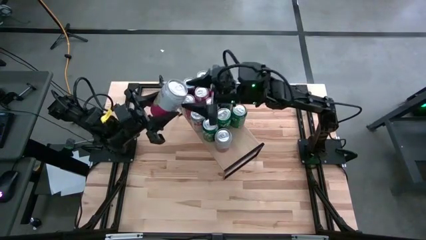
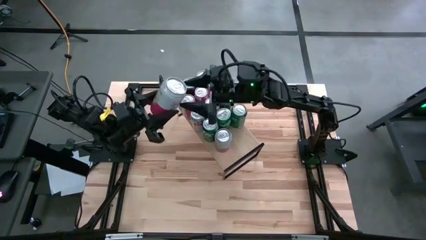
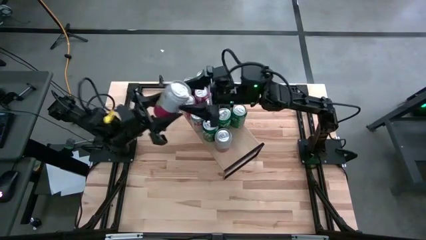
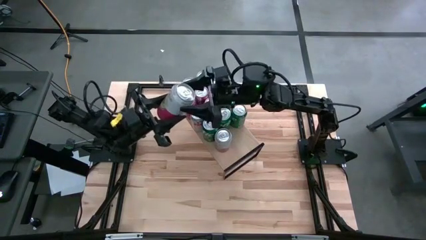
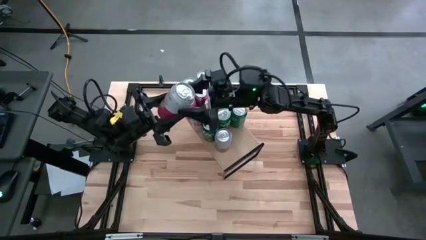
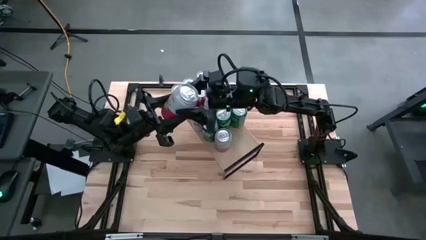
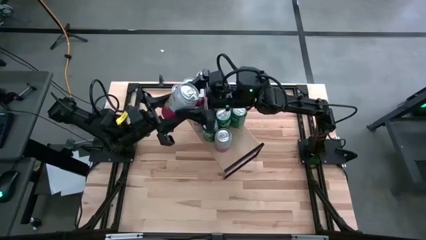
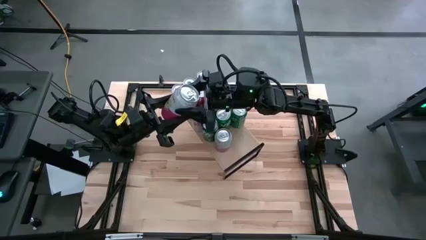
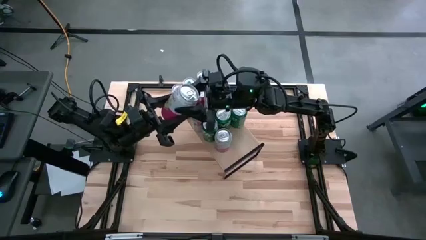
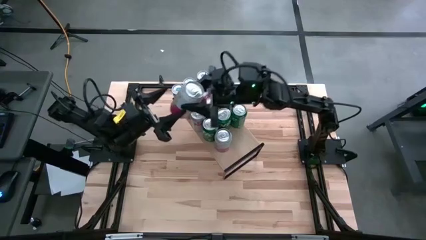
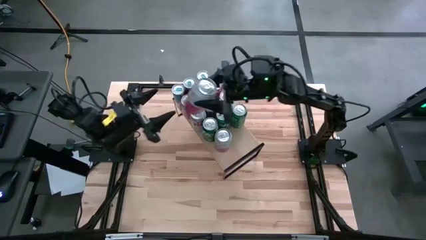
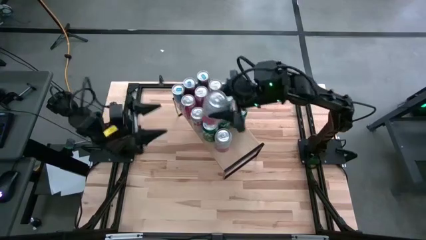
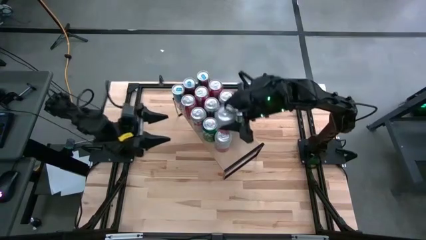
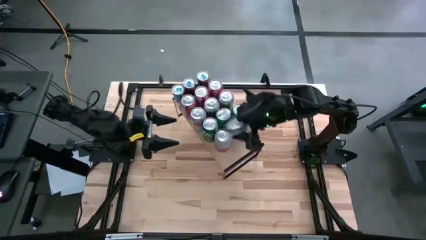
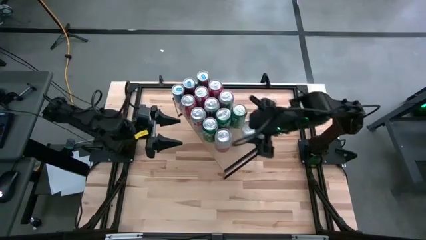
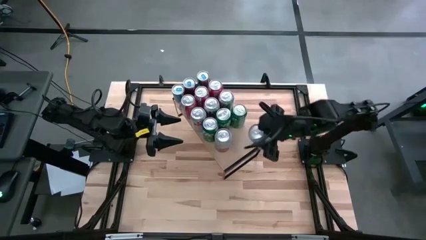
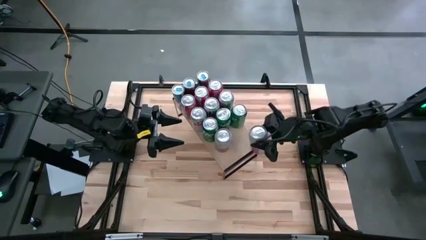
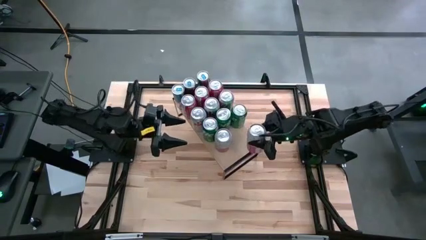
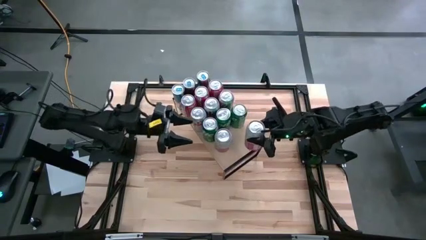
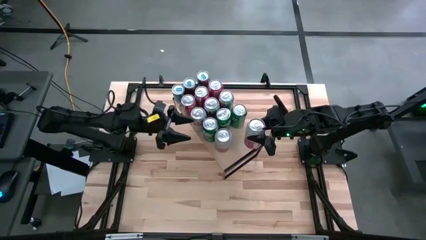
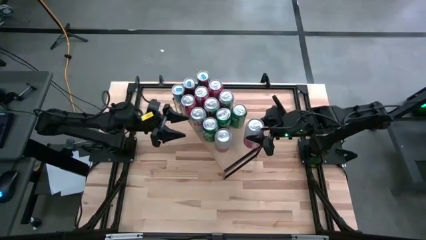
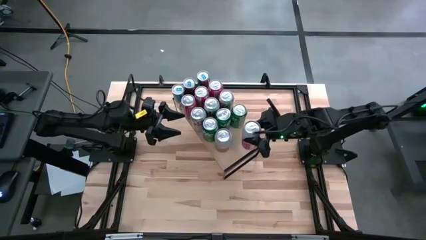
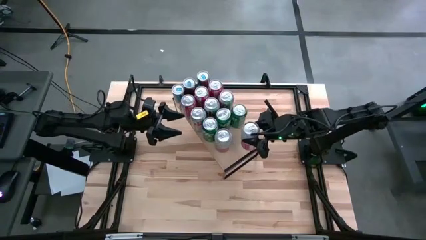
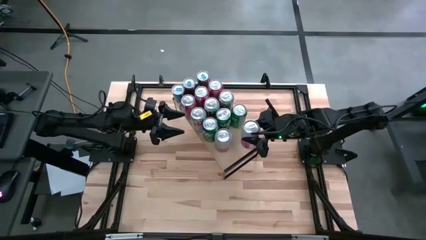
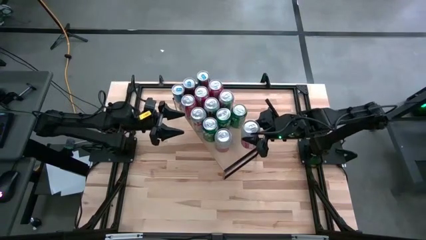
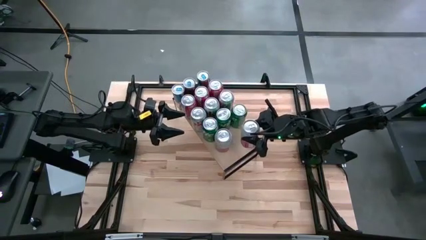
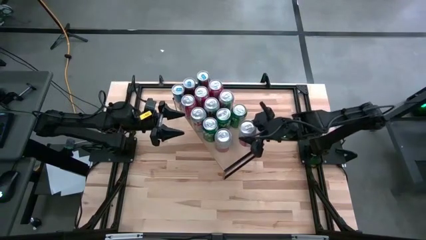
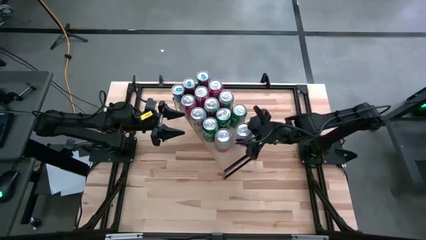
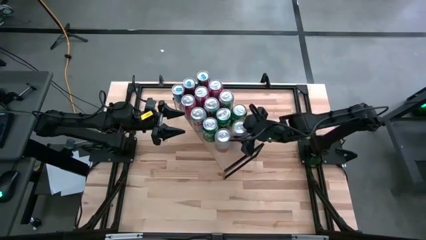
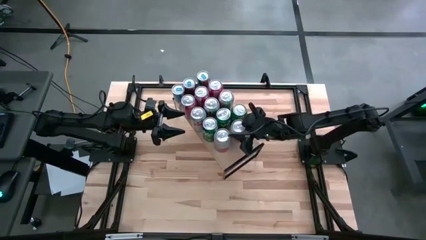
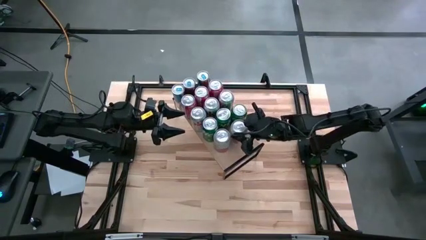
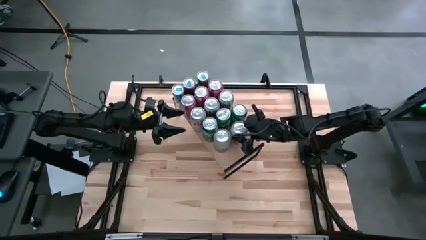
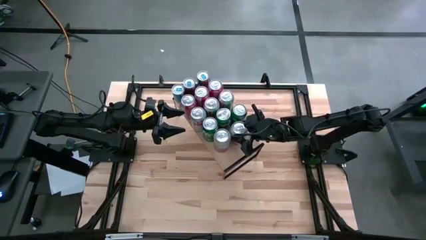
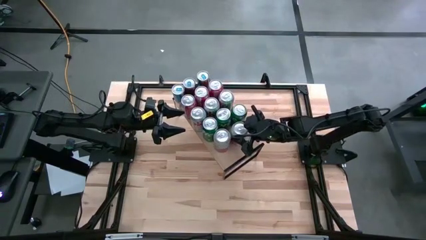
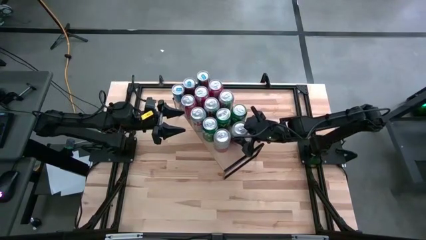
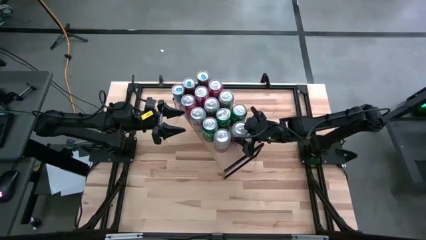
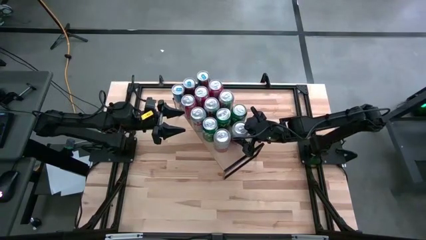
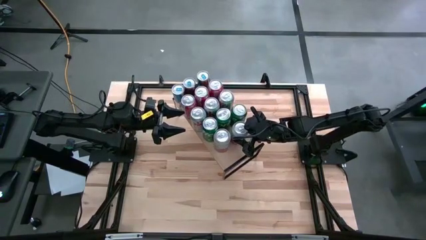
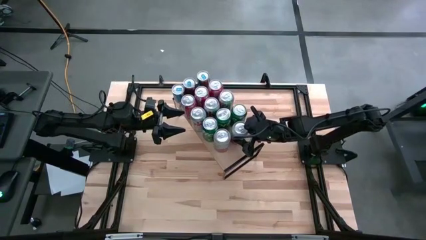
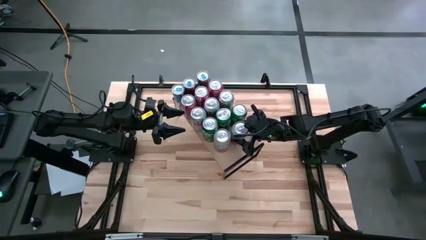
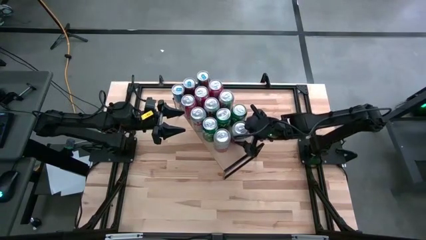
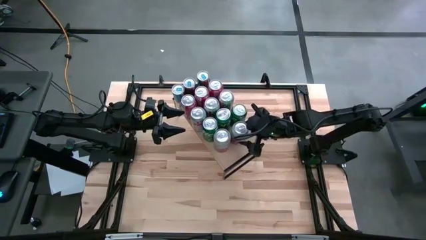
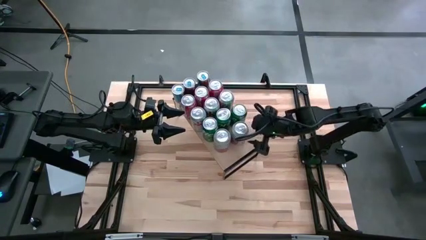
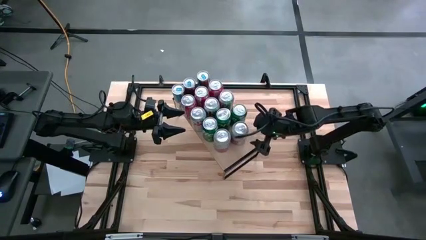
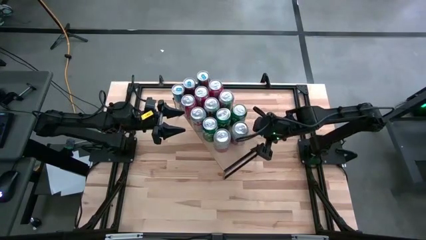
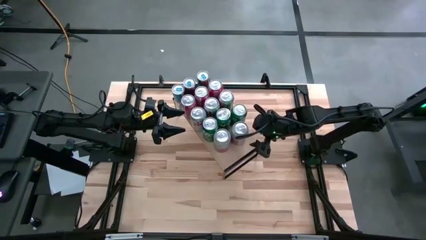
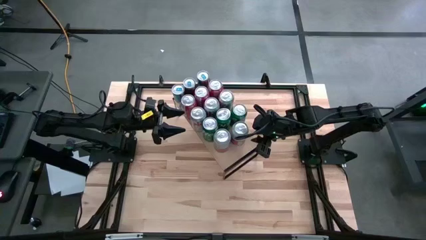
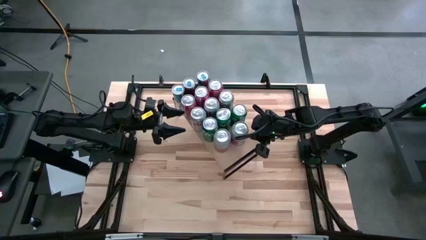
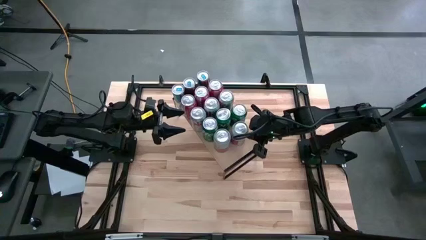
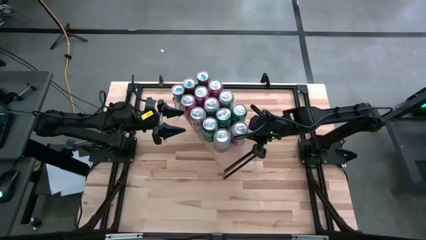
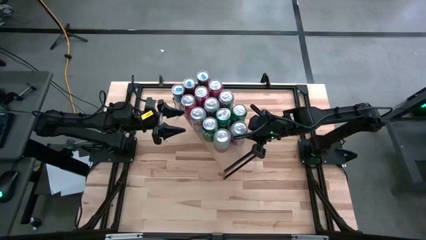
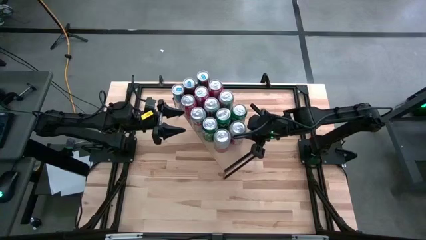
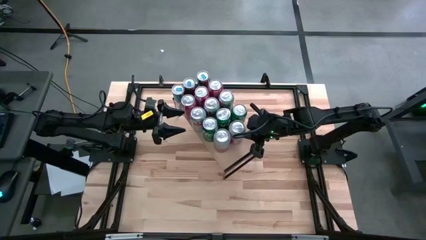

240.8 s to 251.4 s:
Task: Place canned beverage on shelf
Put the pink soda can on the shelf aligned with the other pink soda can
